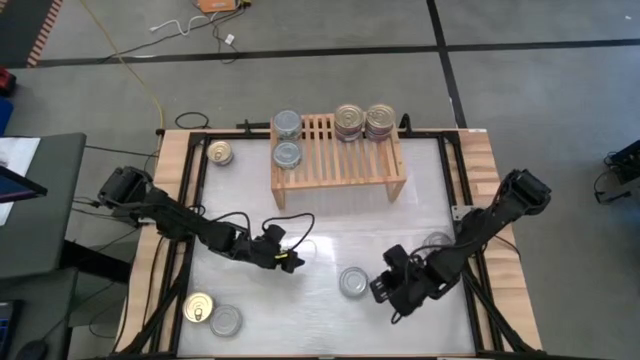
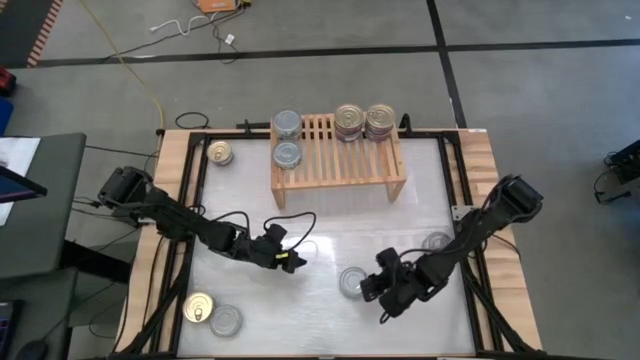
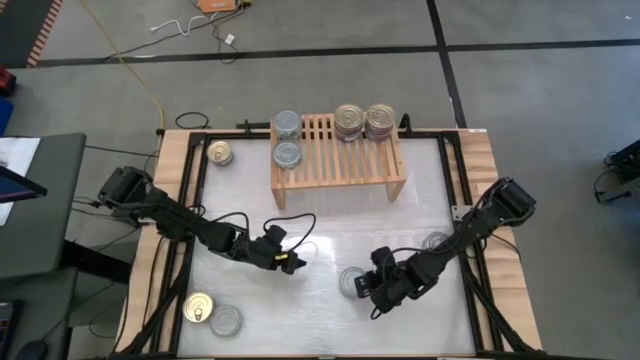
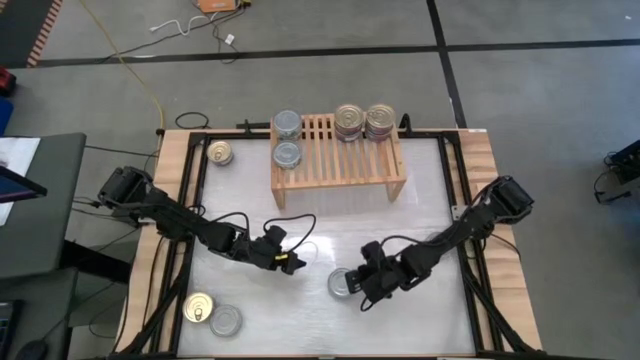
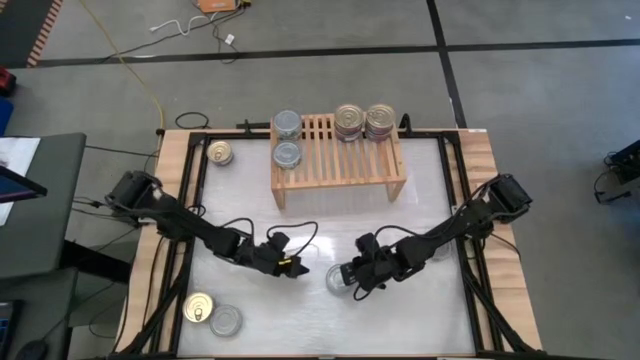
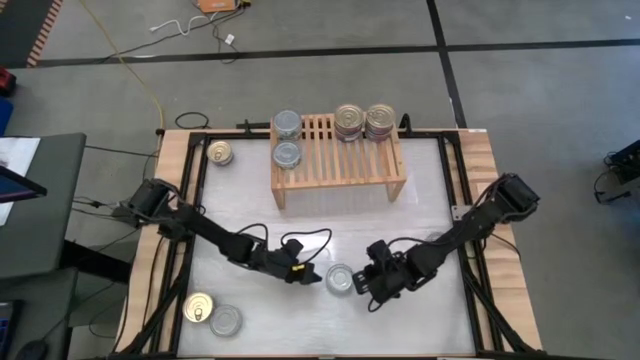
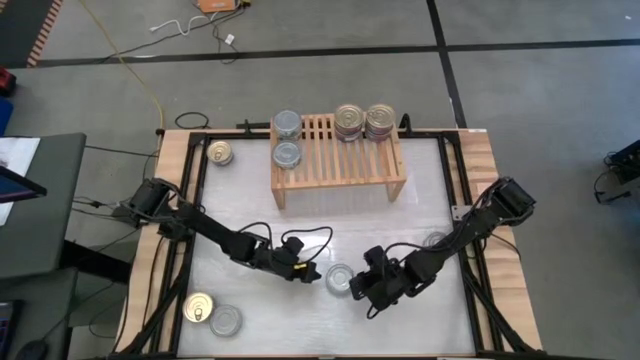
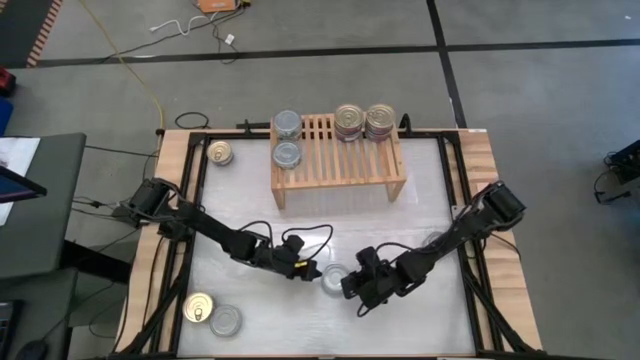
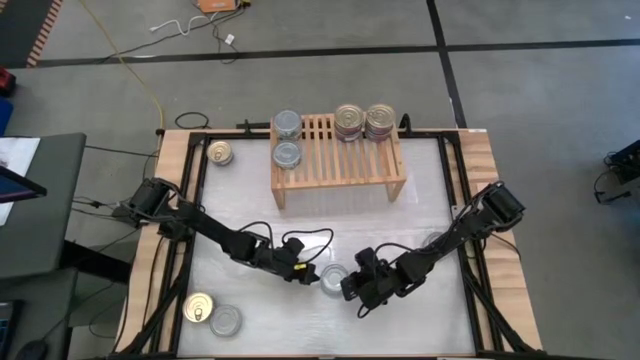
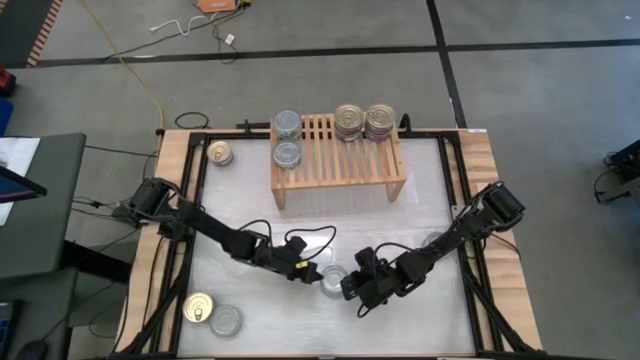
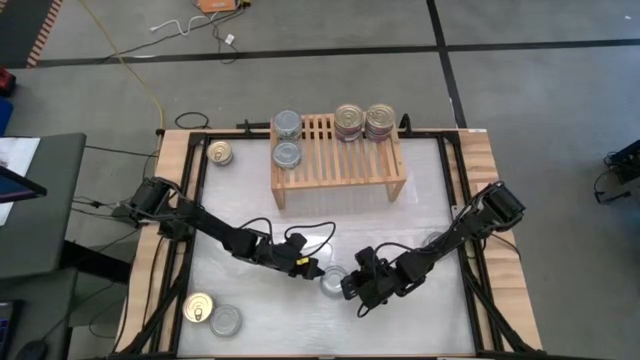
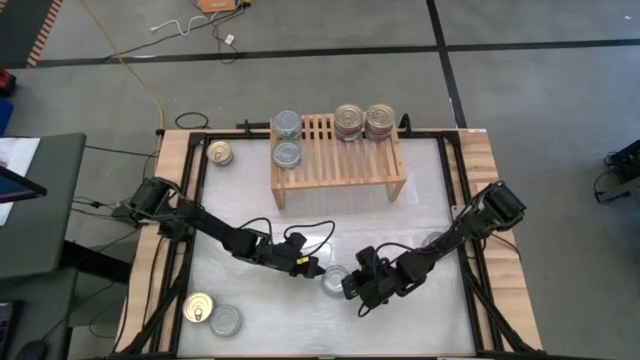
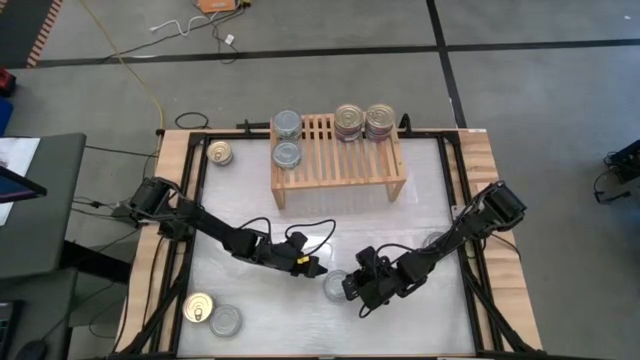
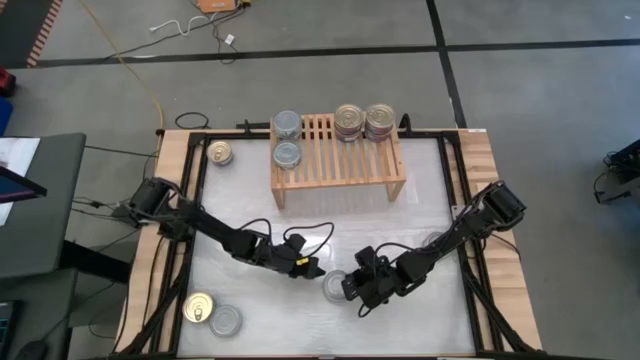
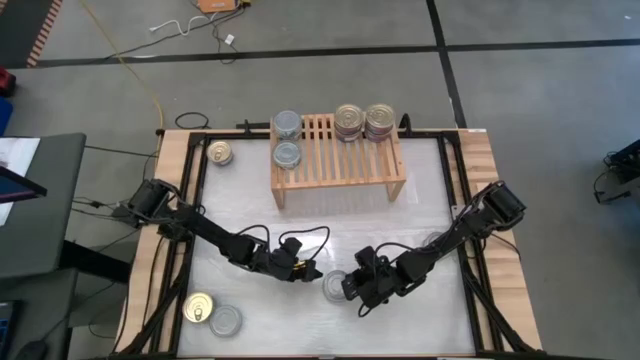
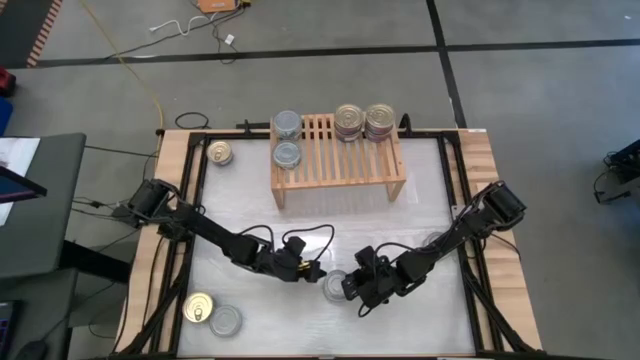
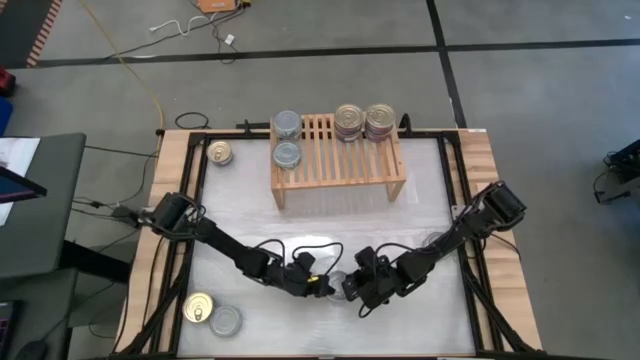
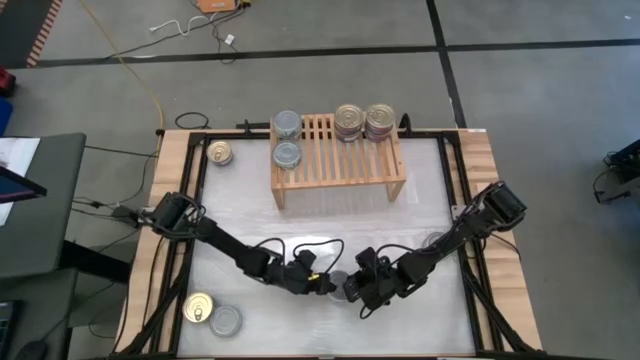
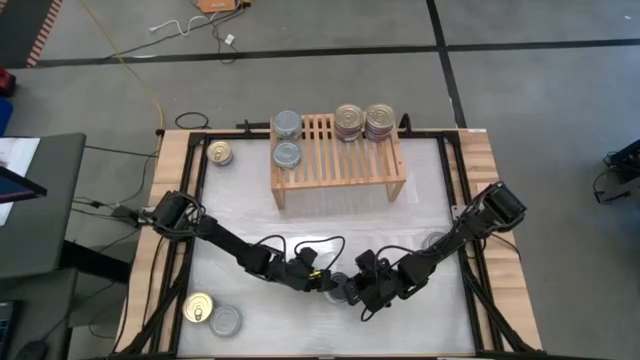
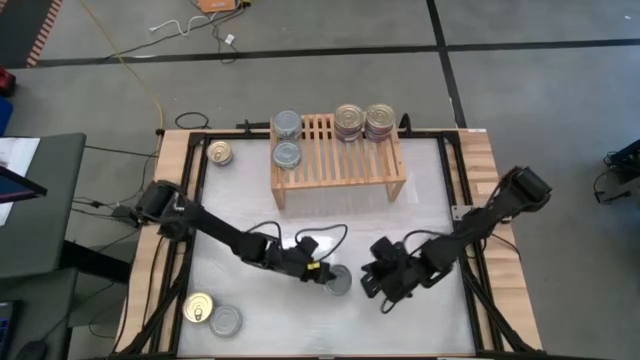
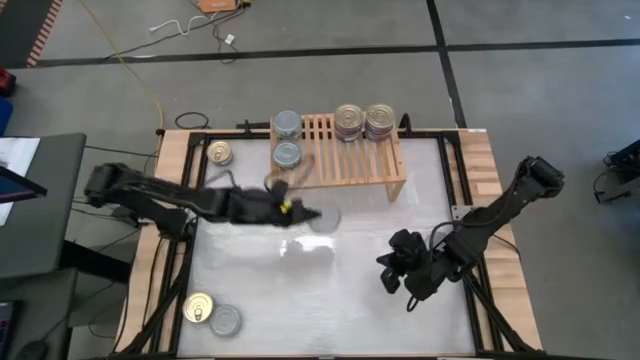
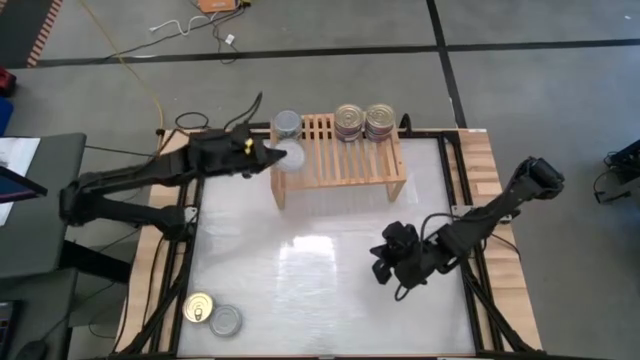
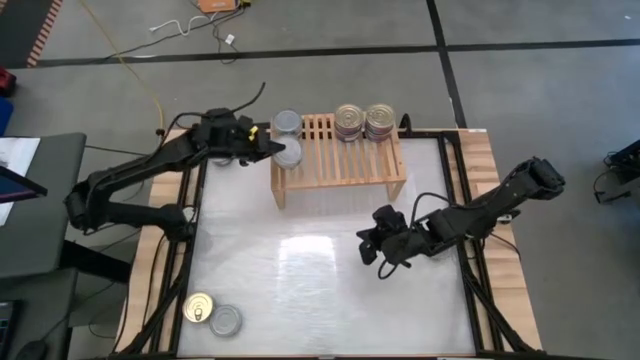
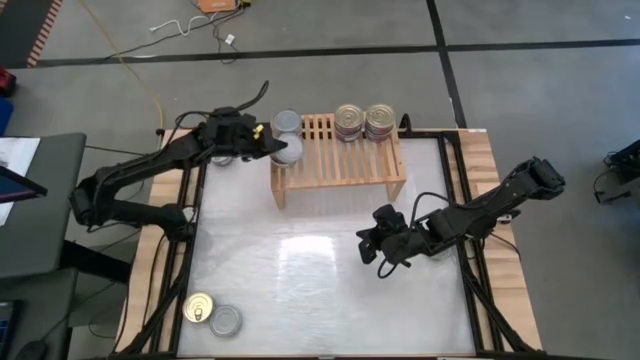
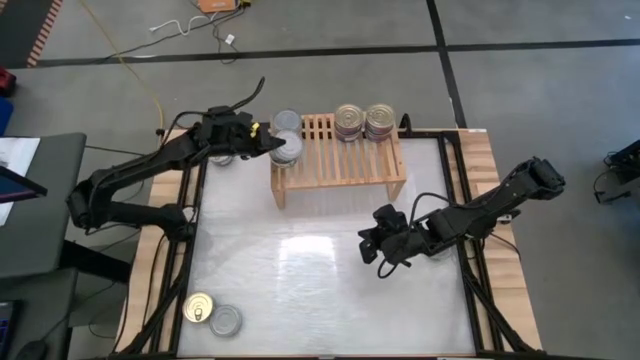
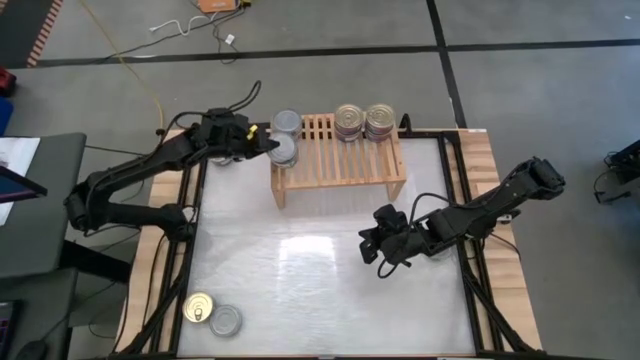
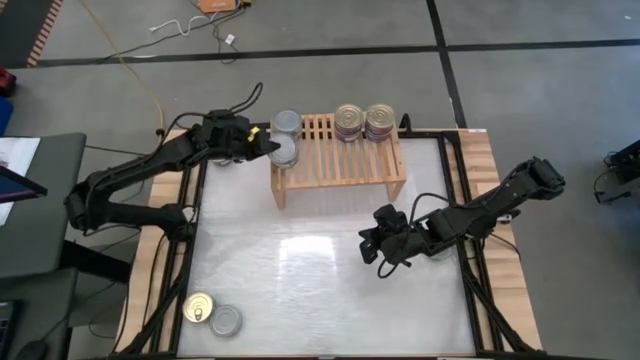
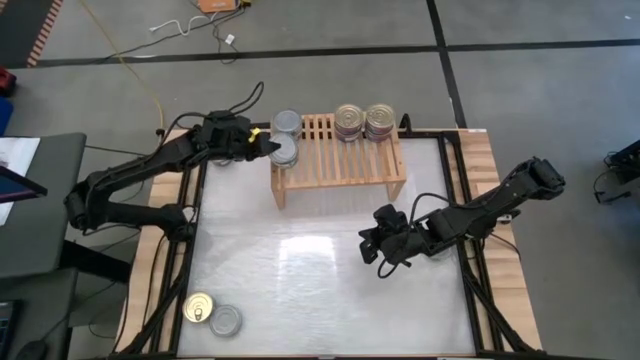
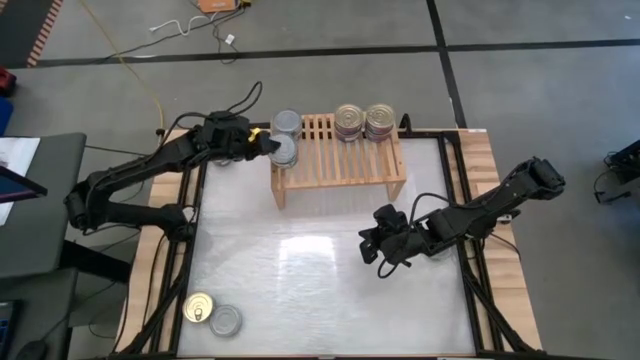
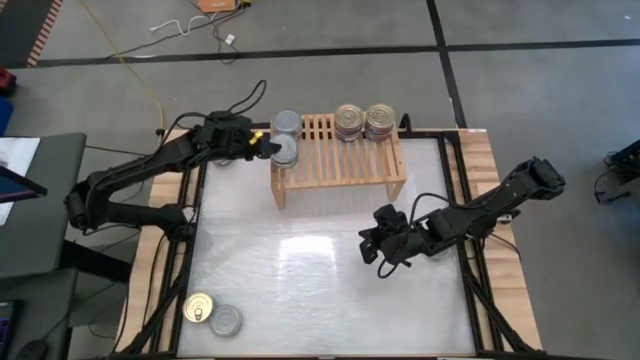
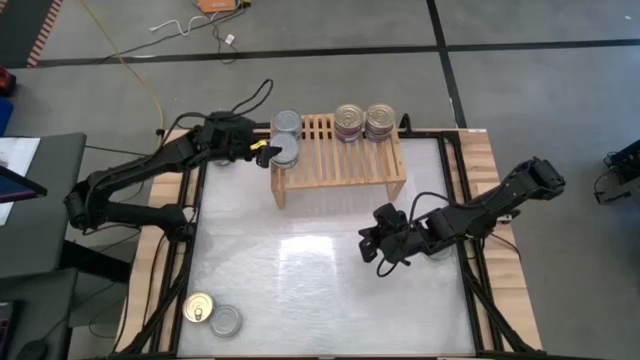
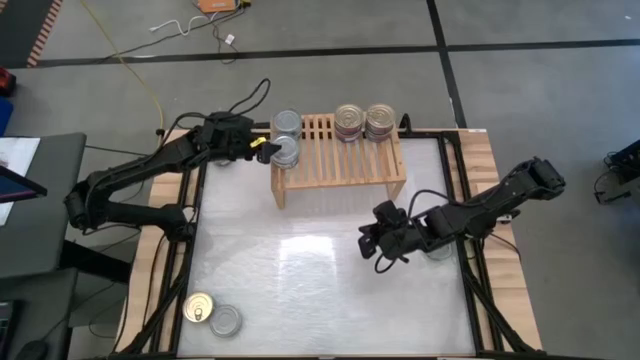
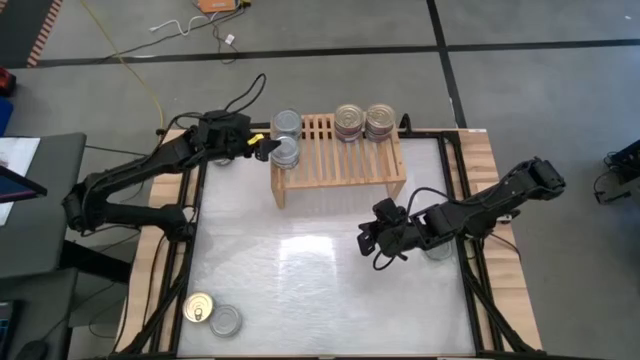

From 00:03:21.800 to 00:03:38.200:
Task: Stack canned seafood by type on shelf
Stack the green tuna can on top of the green tuna can on the shelf

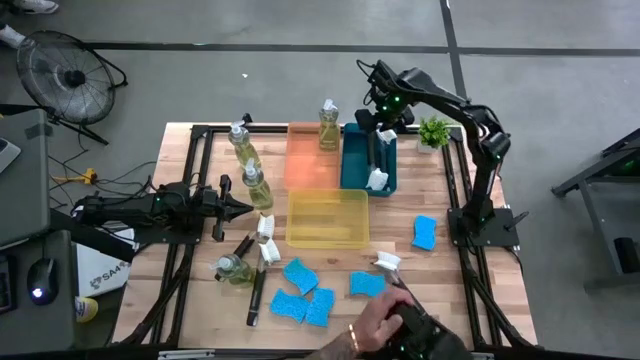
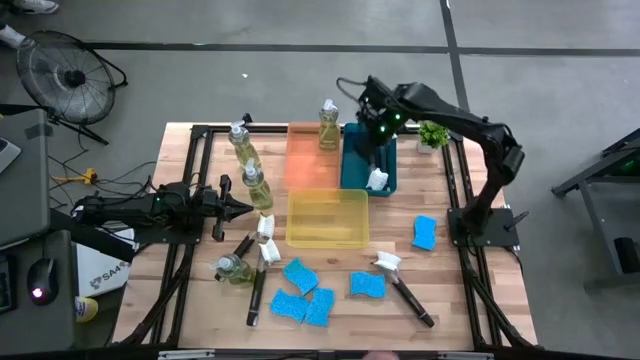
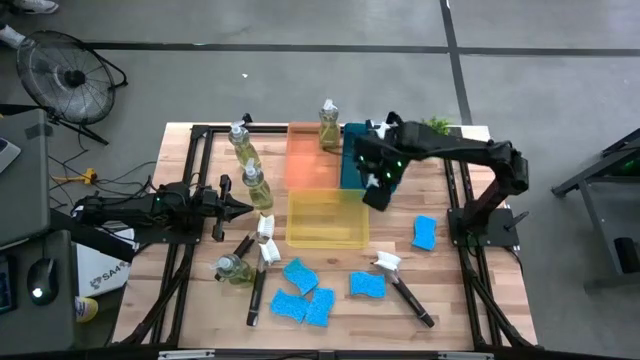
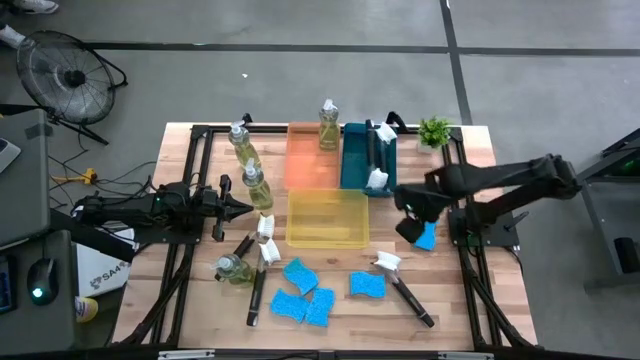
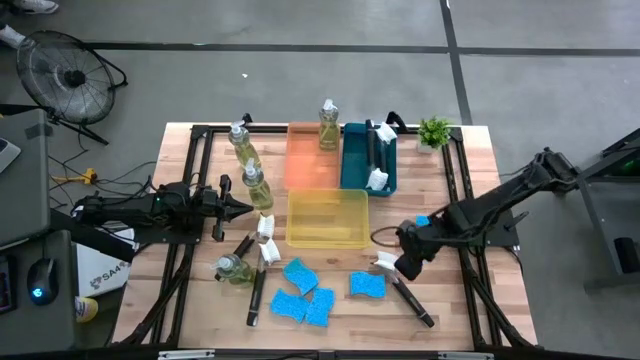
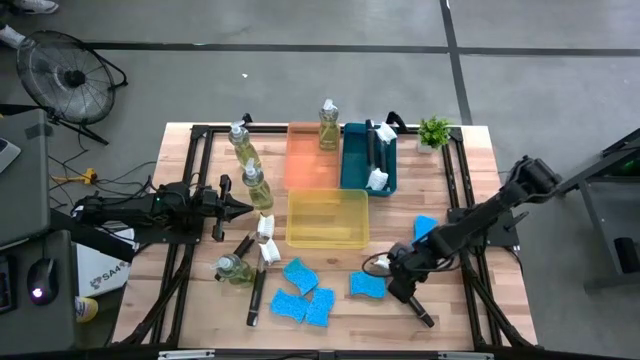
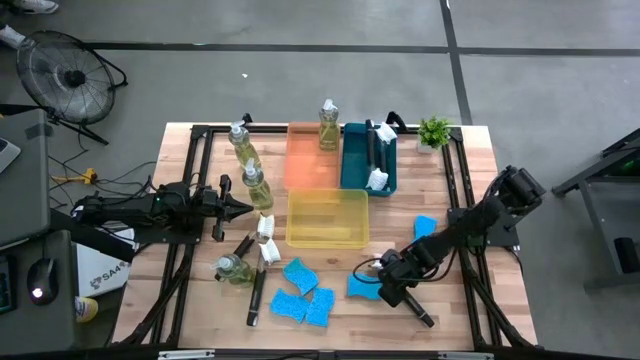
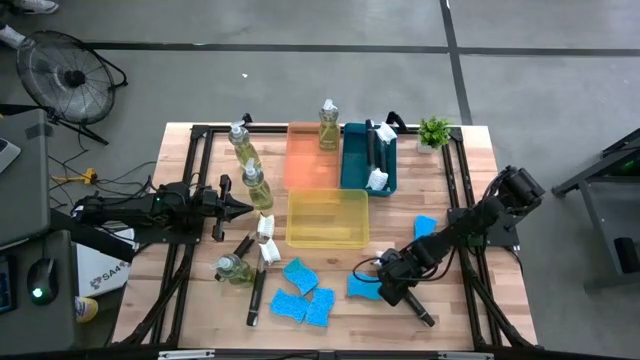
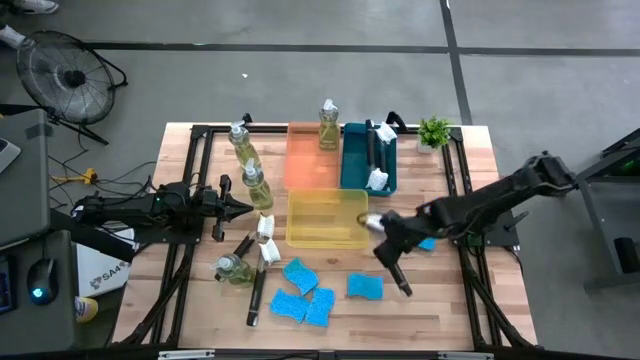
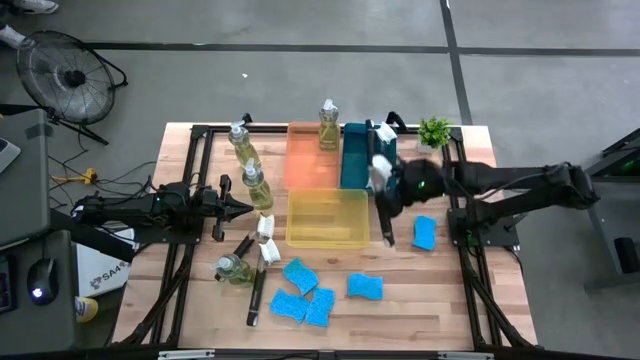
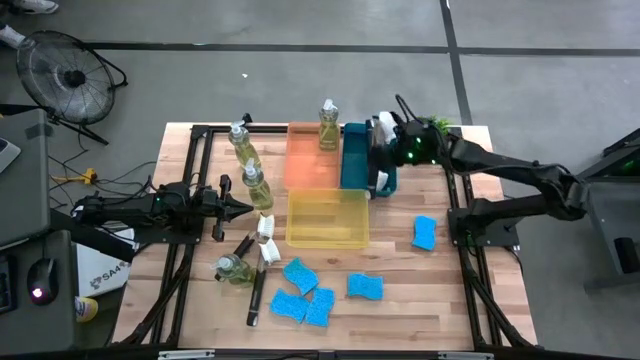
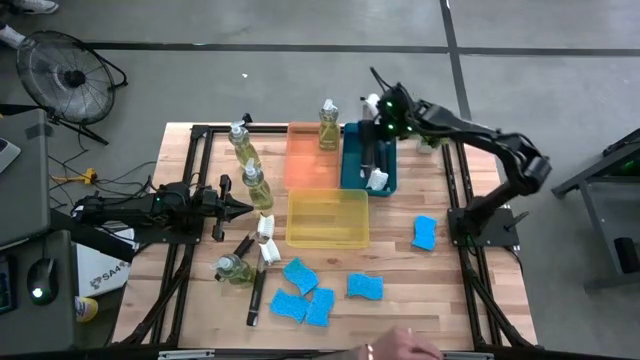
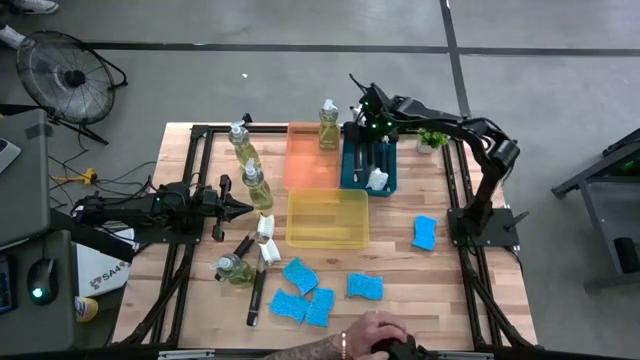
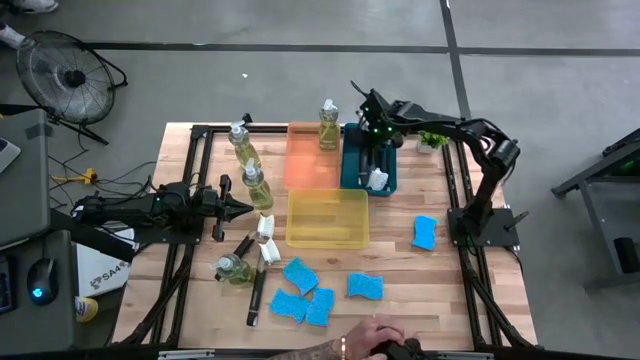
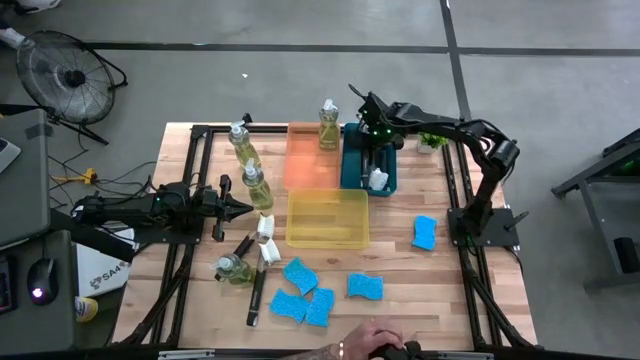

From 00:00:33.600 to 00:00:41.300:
Task: Pick & Place Kitchen Sink Supplies
Put the dish brush into the blue bin
